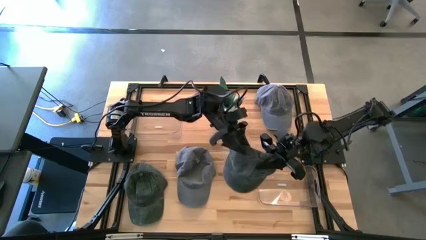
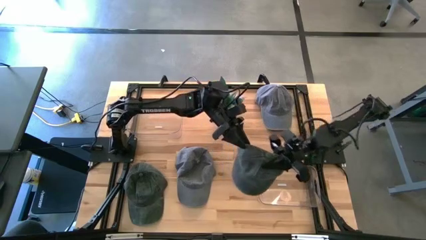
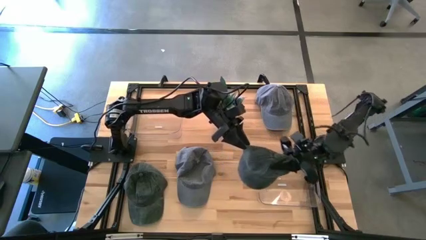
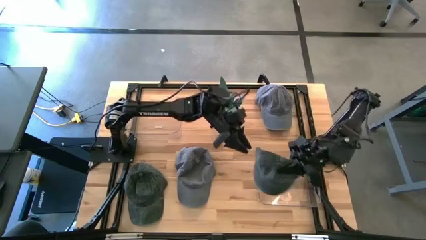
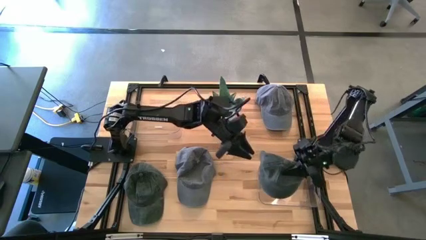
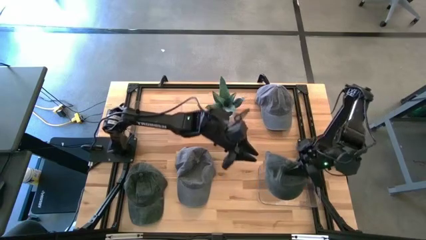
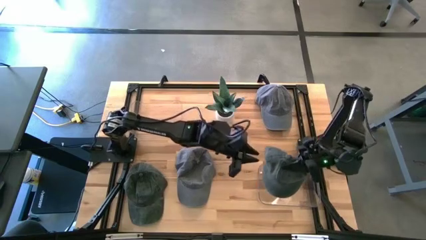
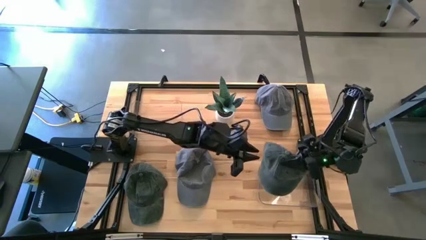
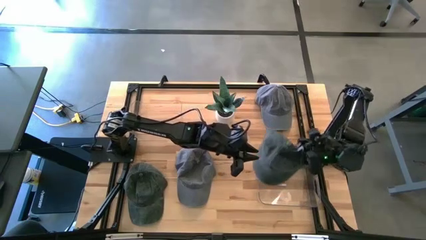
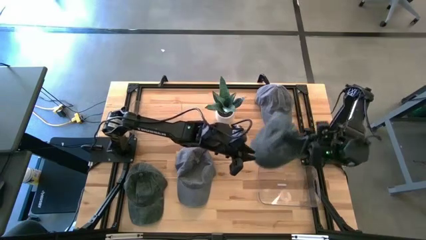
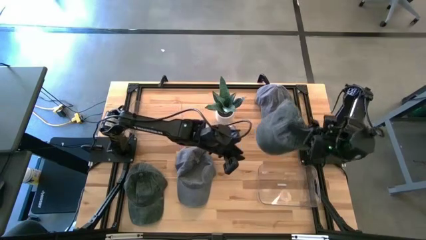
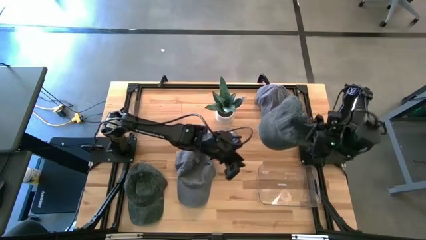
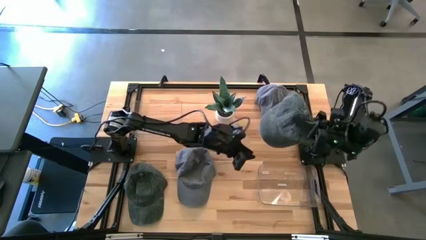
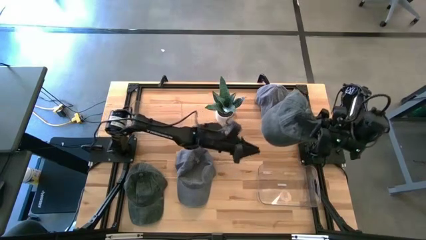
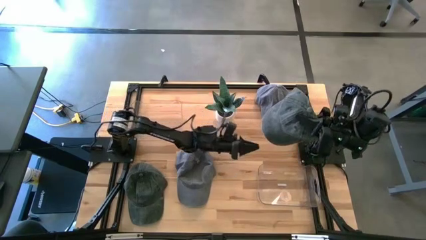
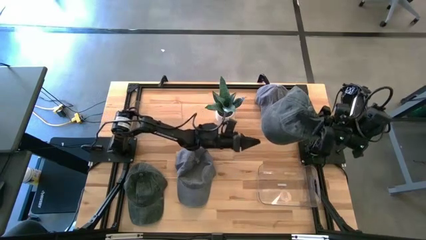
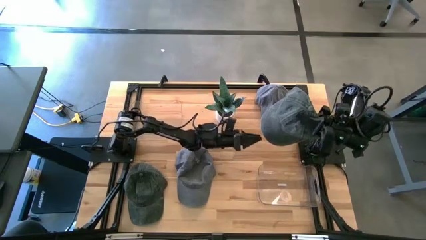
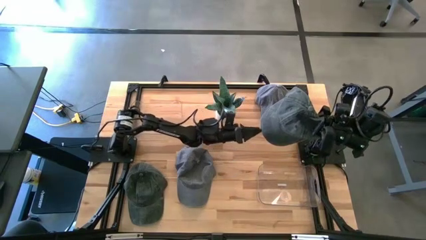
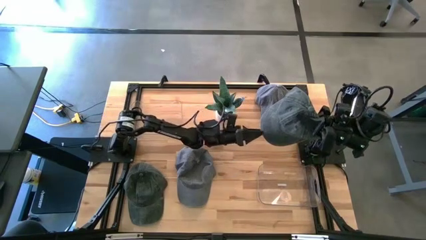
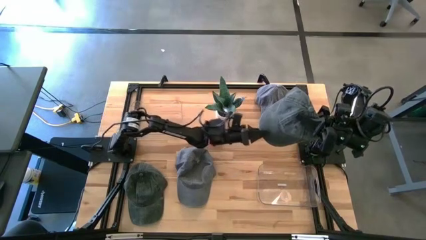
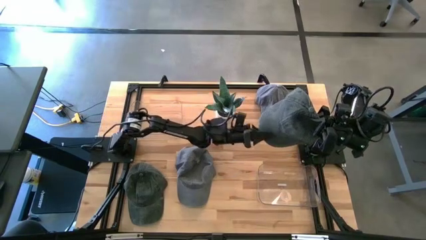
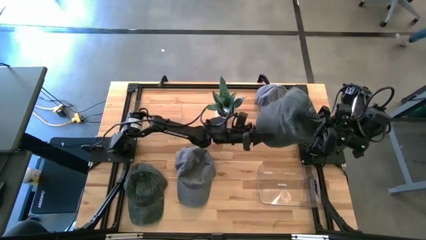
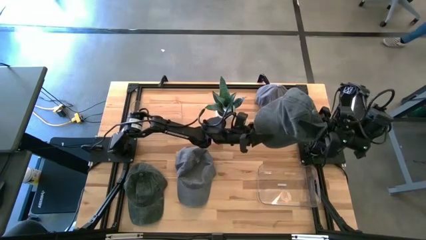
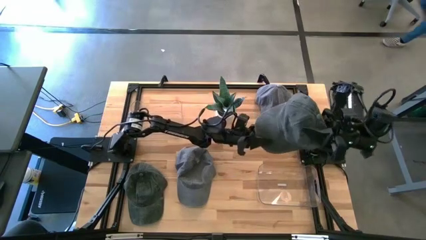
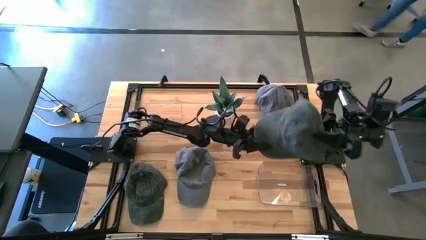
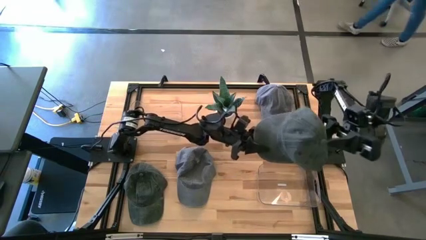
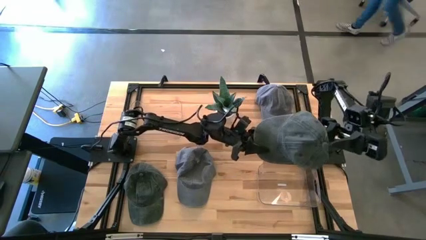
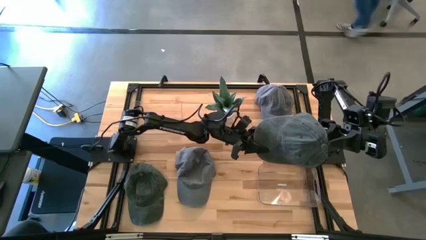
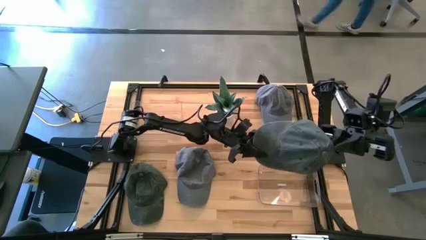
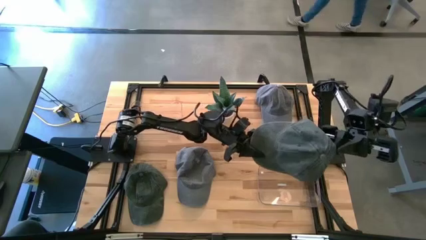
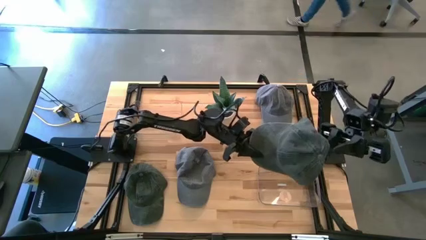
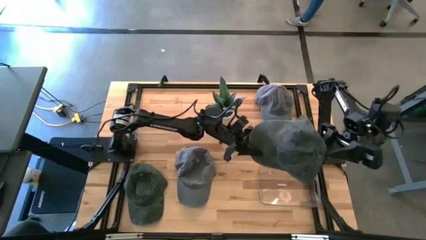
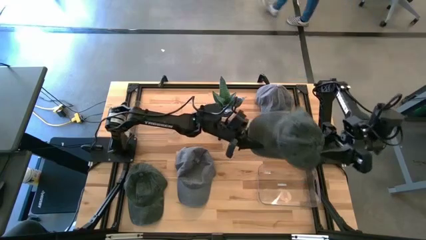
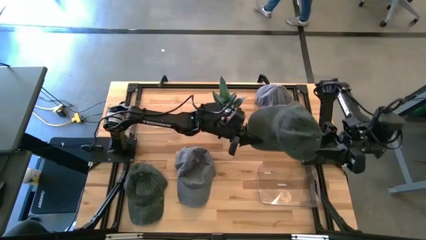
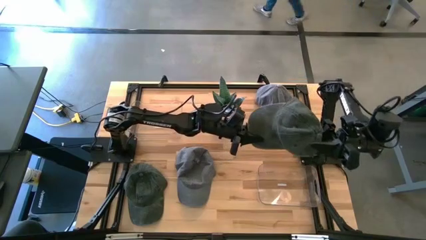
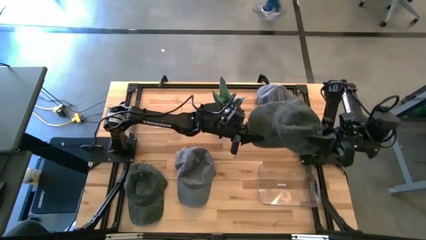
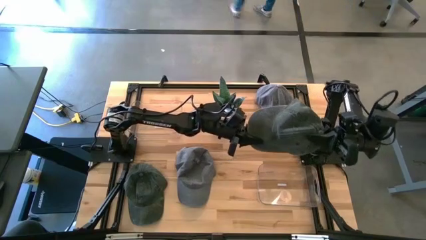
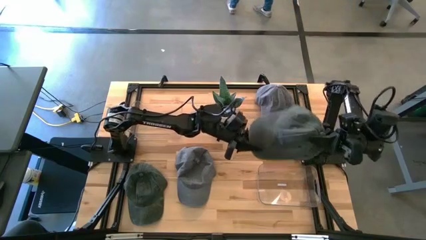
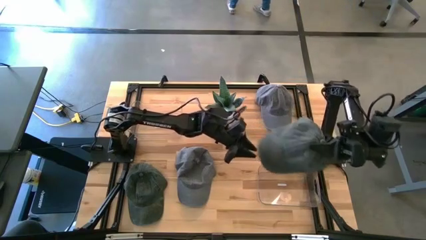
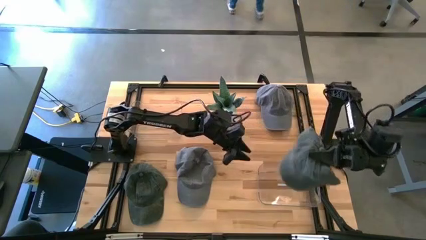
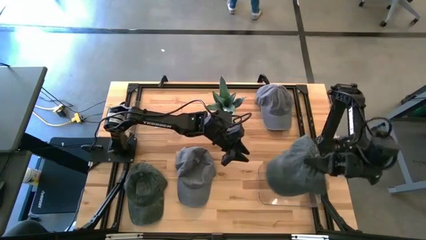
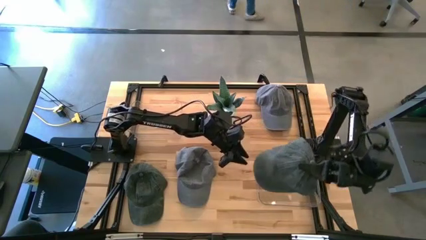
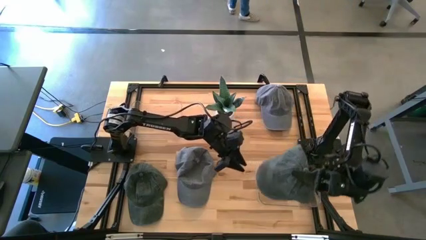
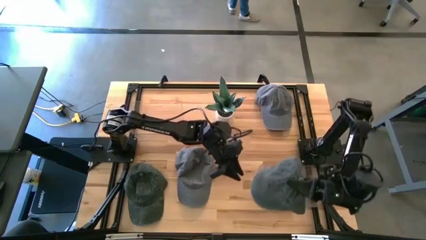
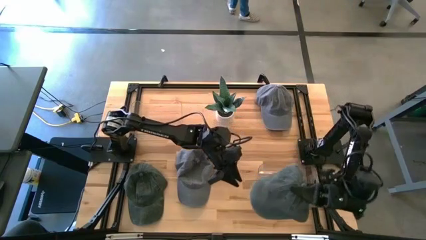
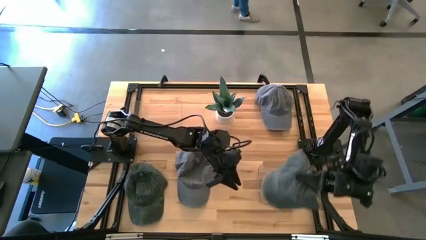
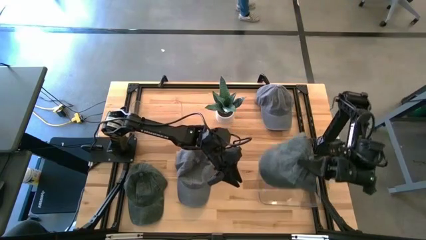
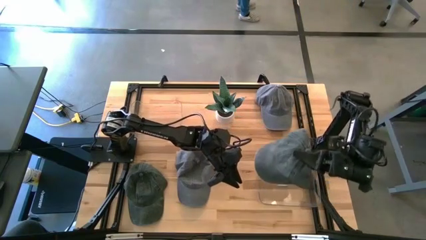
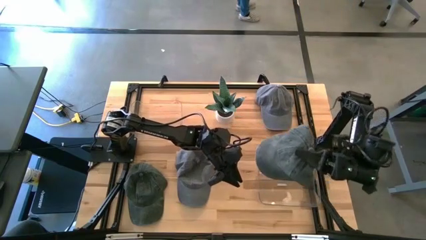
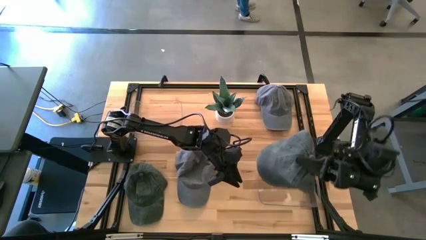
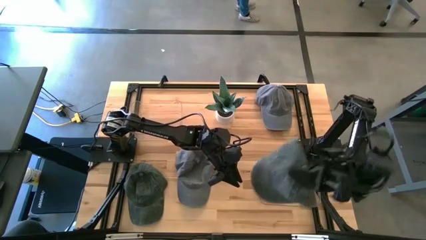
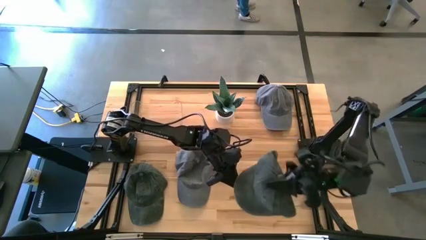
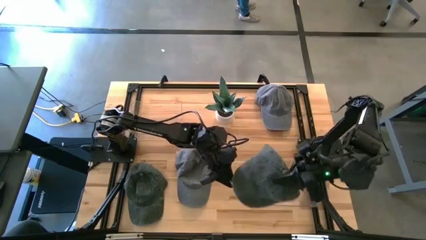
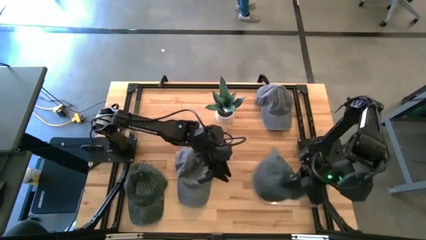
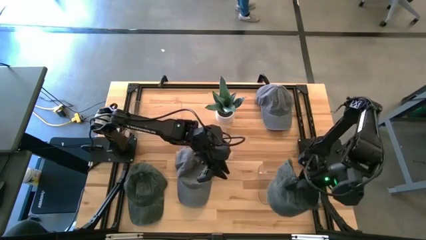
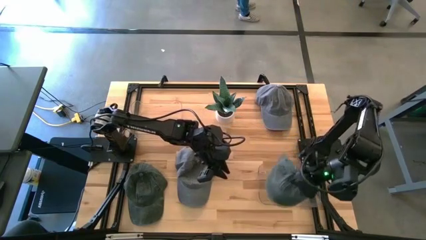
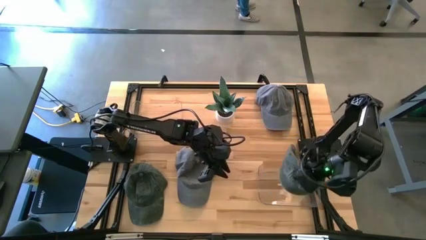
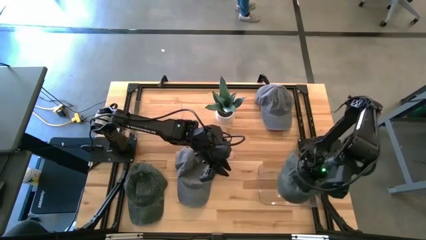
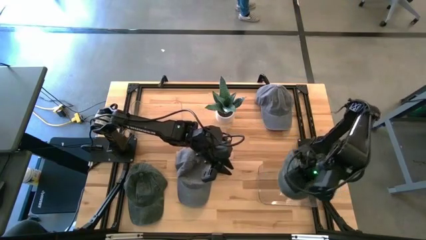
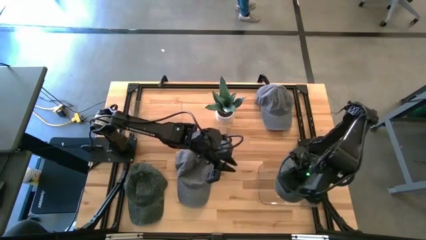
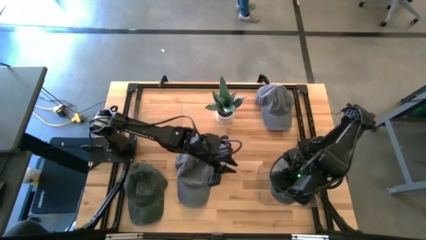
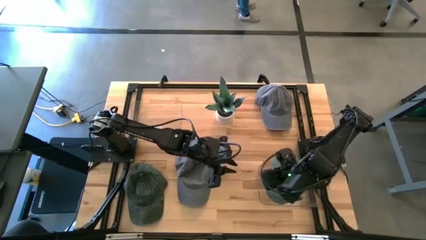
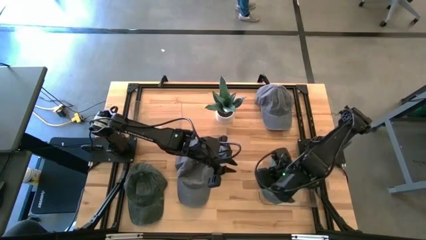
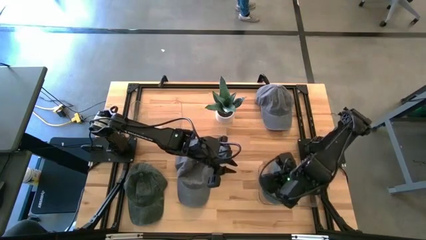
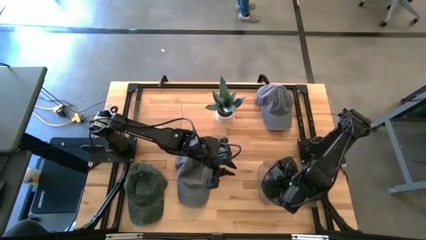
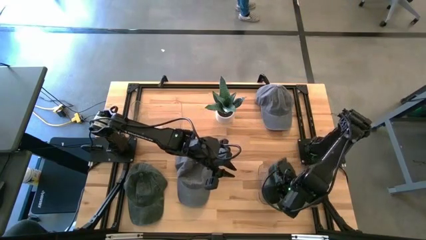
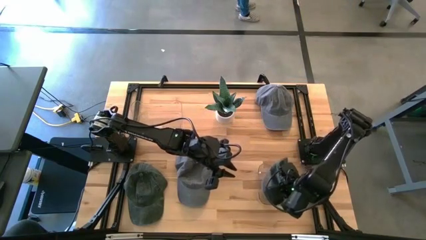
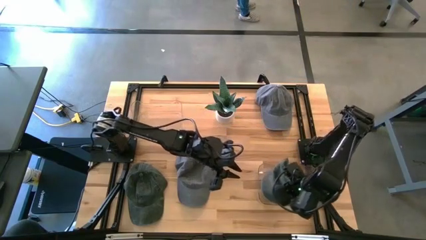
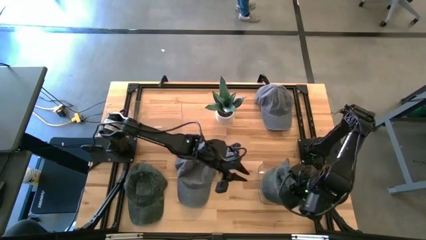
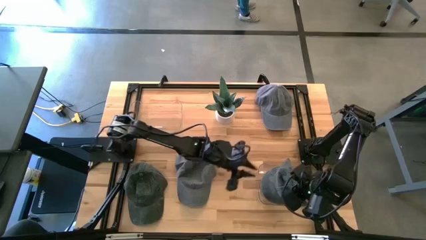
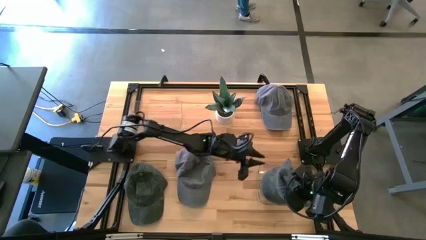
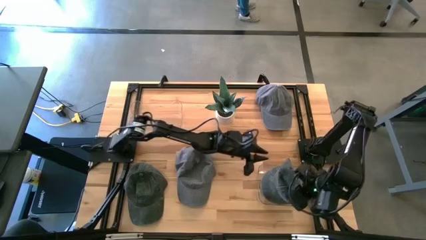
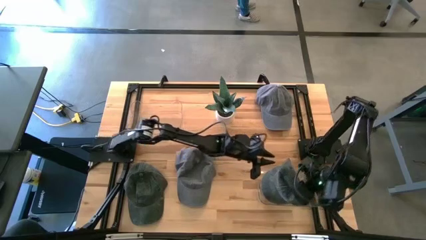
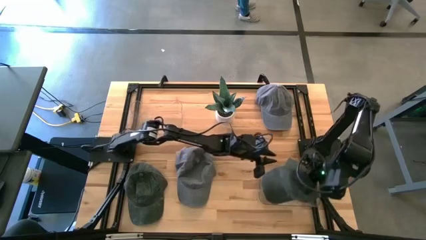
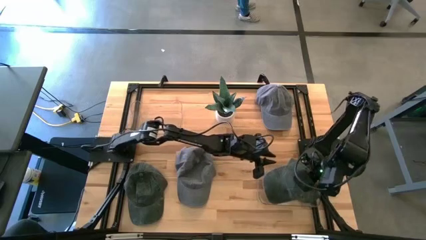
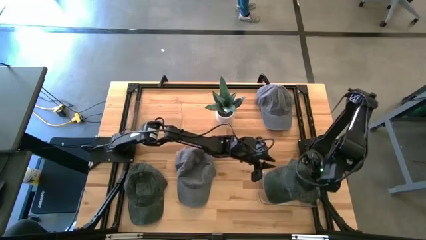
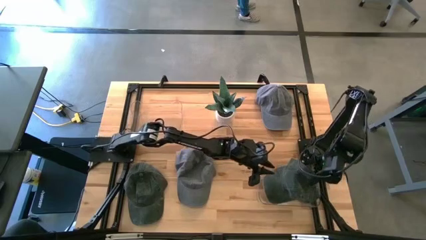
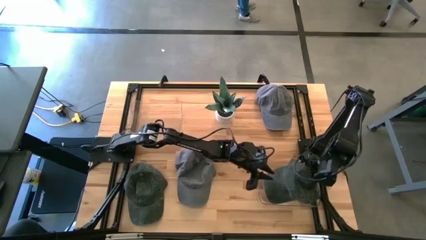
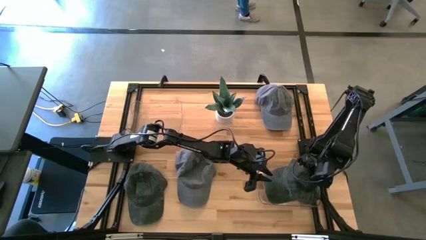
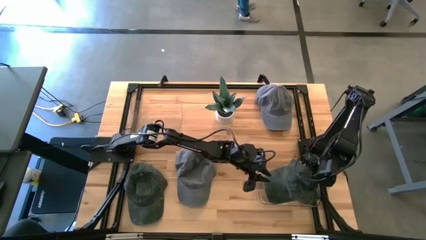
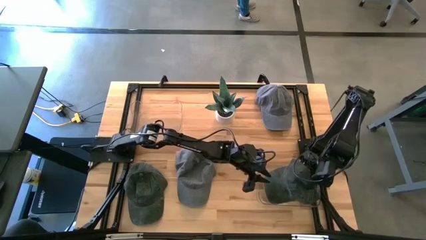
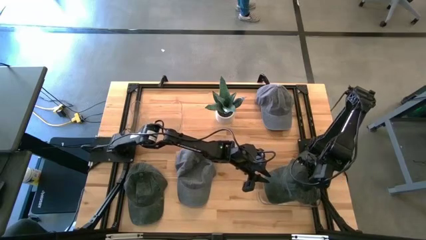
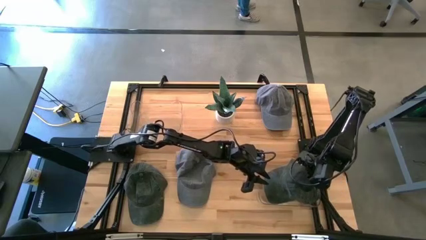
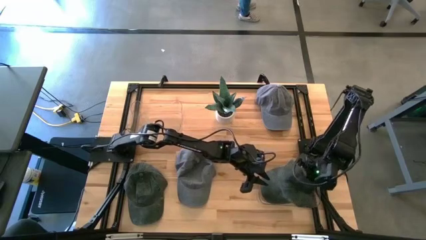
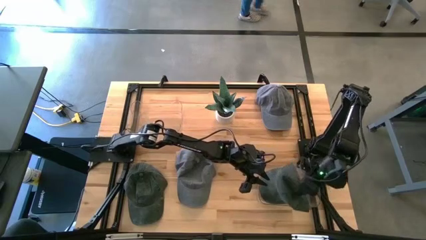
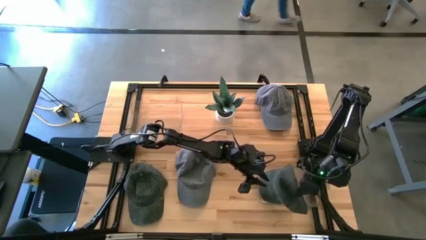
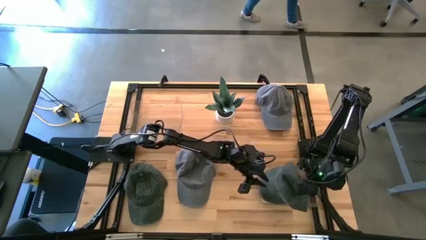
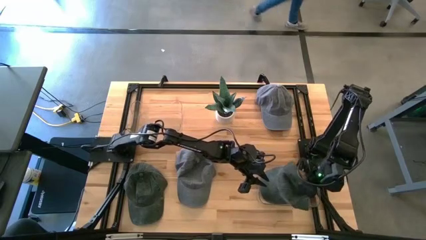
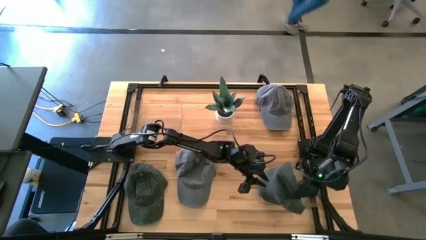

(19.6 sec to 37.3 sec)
Task: Pick & Place hat
Put the right black cap into the right transparent bin
